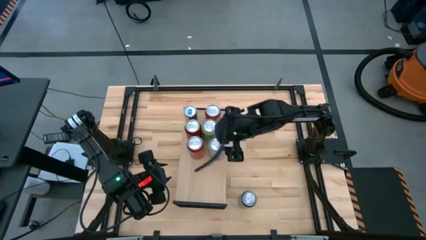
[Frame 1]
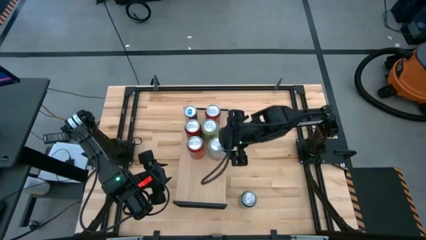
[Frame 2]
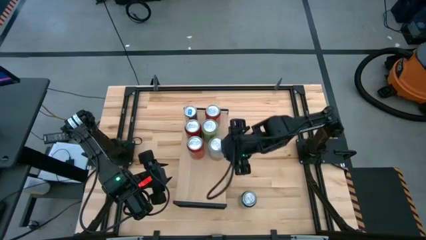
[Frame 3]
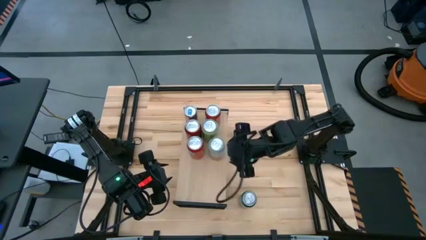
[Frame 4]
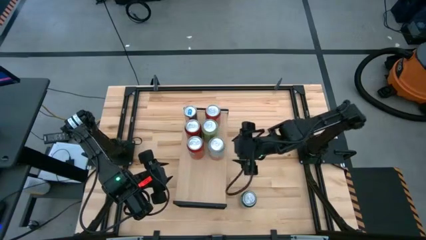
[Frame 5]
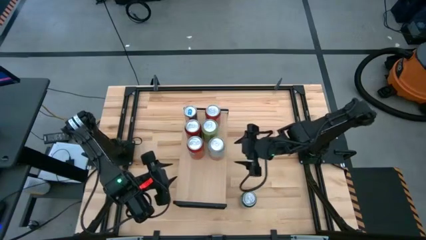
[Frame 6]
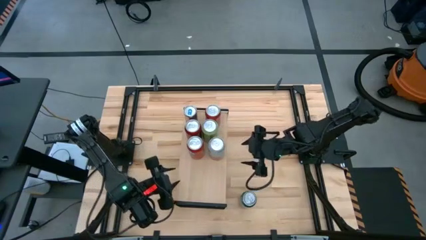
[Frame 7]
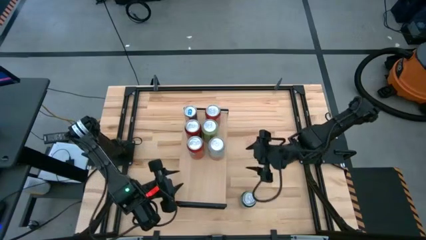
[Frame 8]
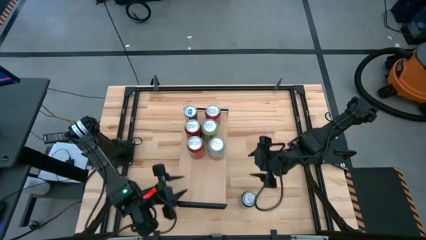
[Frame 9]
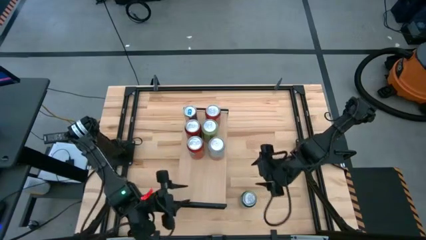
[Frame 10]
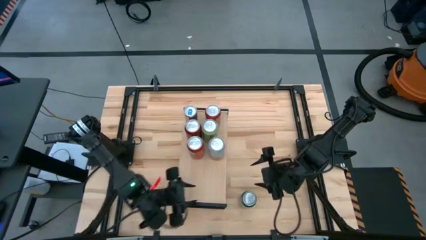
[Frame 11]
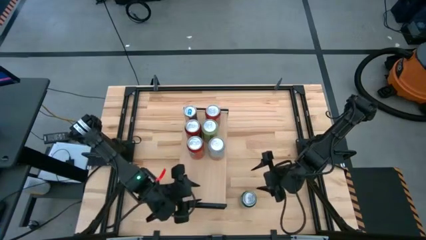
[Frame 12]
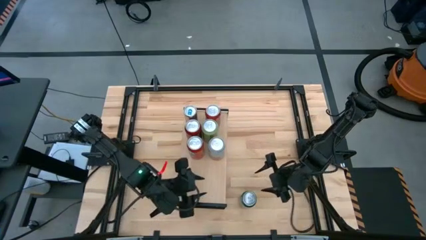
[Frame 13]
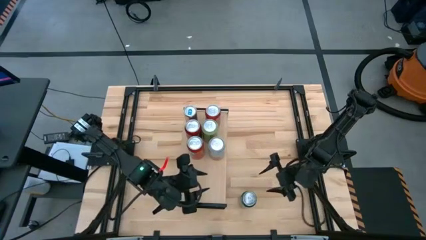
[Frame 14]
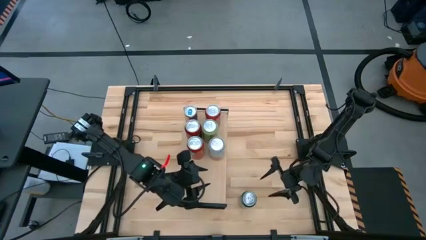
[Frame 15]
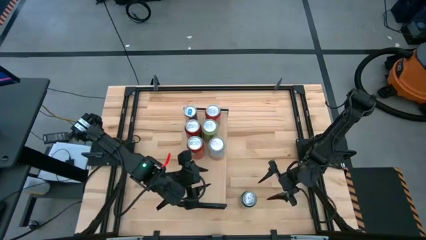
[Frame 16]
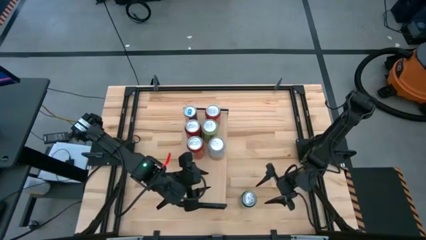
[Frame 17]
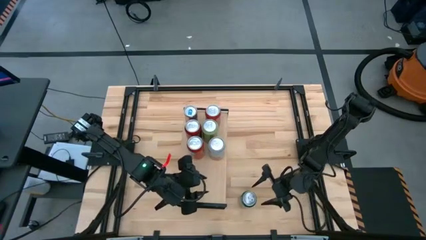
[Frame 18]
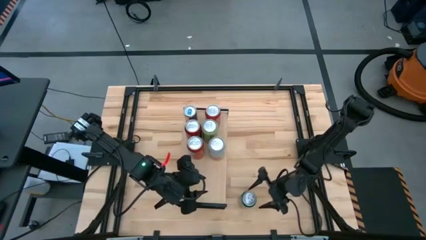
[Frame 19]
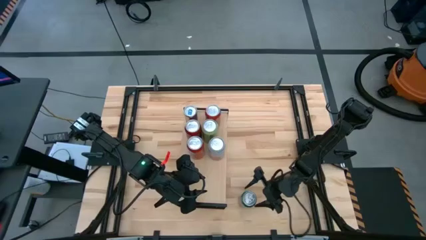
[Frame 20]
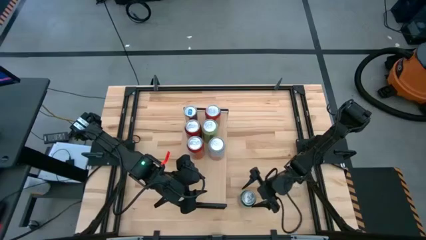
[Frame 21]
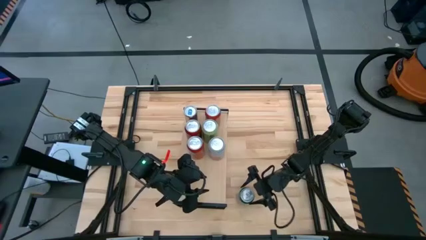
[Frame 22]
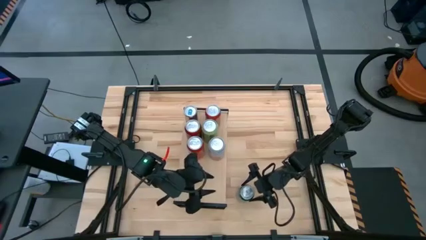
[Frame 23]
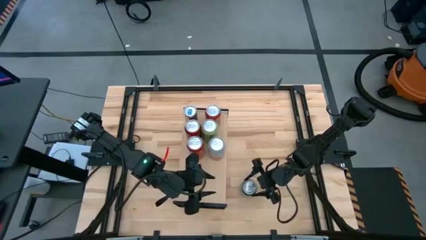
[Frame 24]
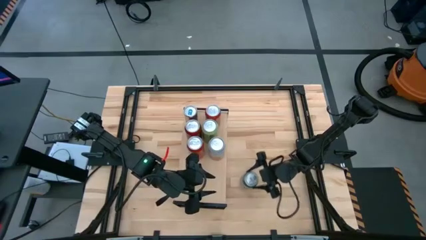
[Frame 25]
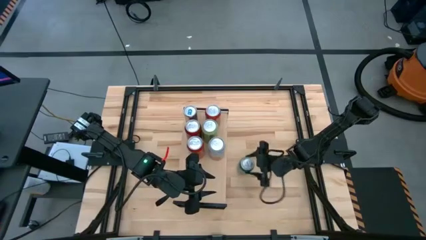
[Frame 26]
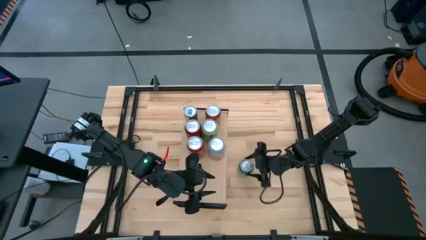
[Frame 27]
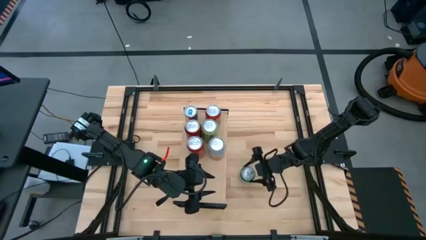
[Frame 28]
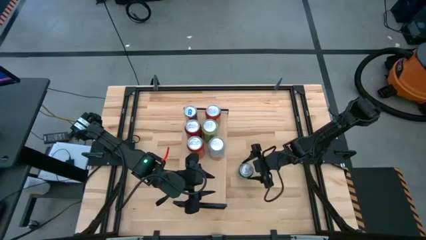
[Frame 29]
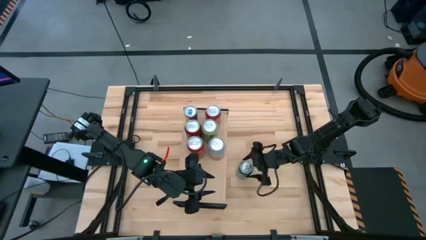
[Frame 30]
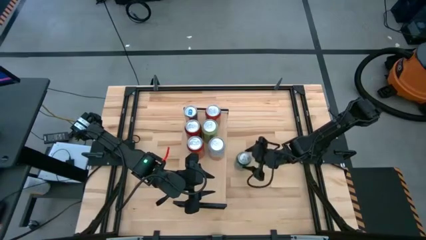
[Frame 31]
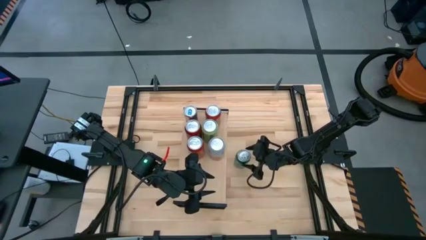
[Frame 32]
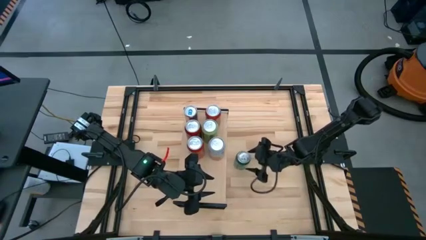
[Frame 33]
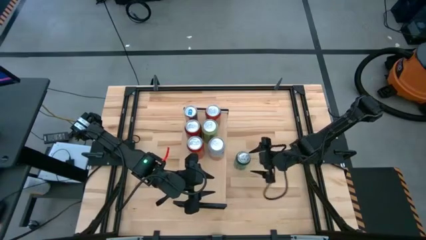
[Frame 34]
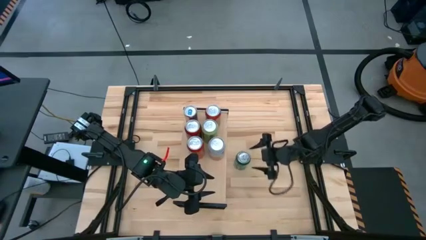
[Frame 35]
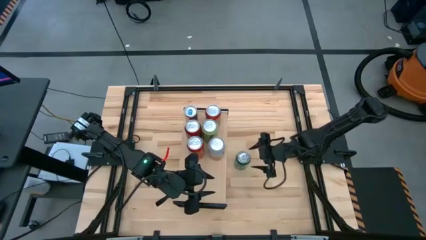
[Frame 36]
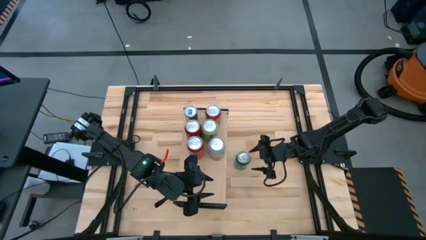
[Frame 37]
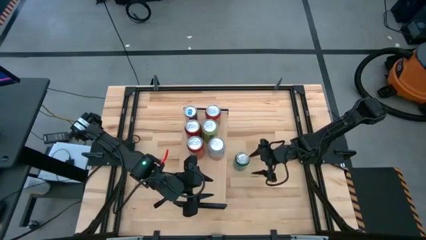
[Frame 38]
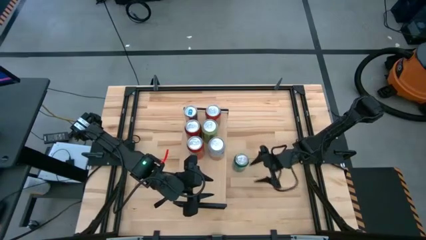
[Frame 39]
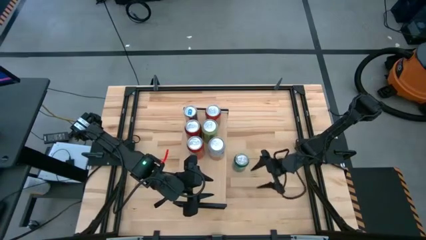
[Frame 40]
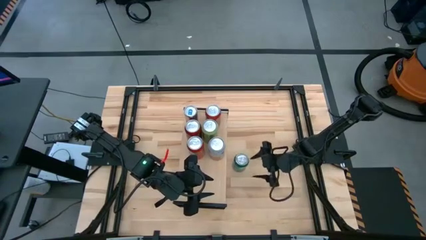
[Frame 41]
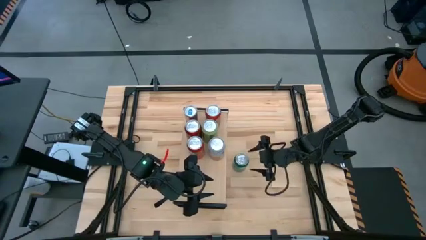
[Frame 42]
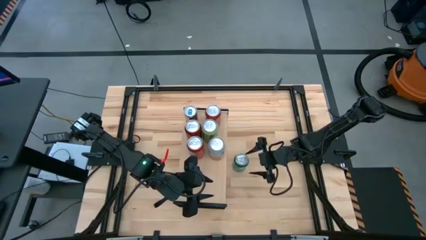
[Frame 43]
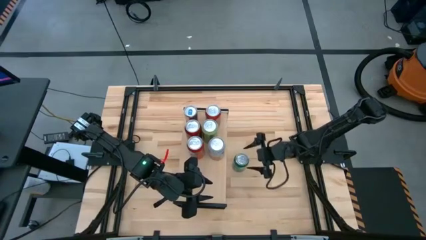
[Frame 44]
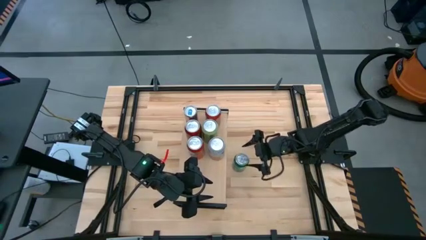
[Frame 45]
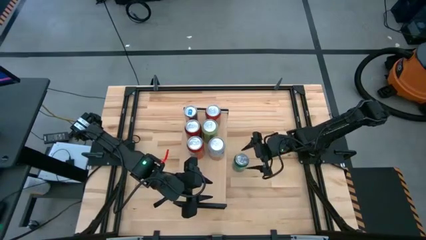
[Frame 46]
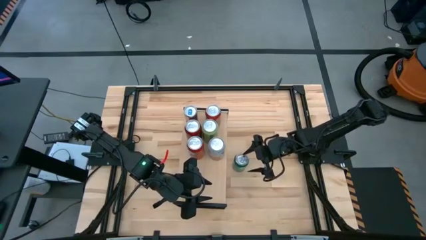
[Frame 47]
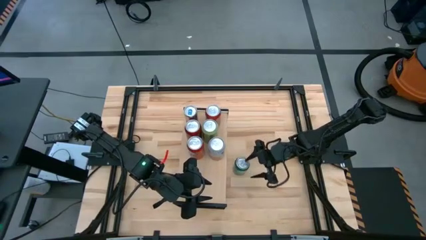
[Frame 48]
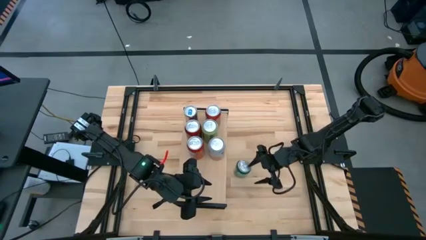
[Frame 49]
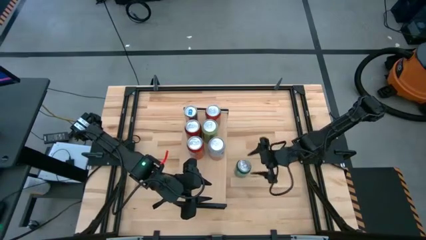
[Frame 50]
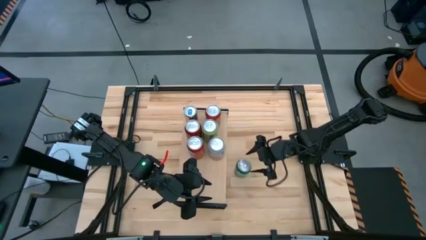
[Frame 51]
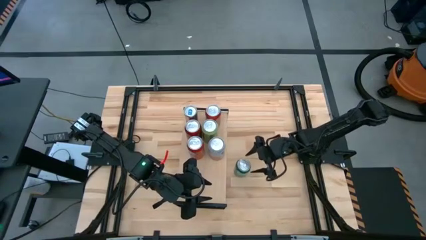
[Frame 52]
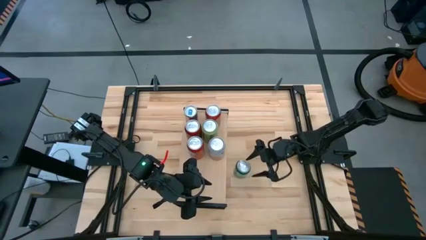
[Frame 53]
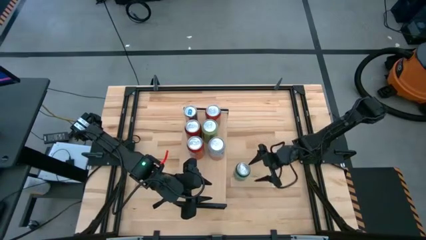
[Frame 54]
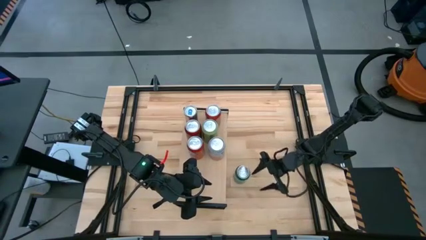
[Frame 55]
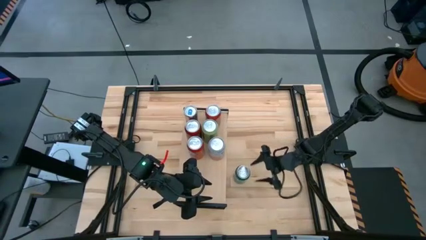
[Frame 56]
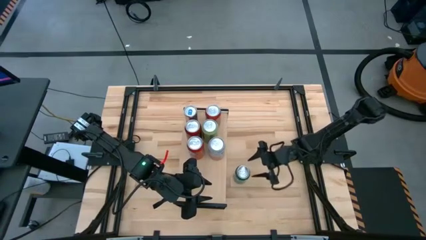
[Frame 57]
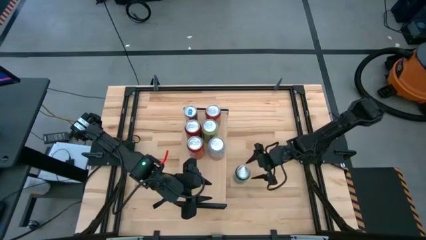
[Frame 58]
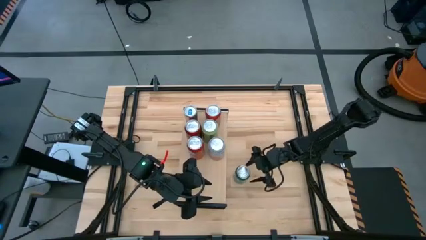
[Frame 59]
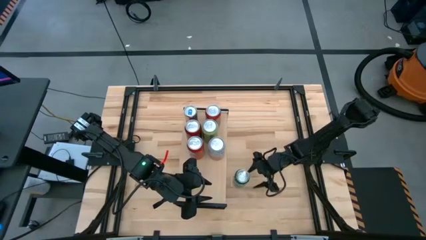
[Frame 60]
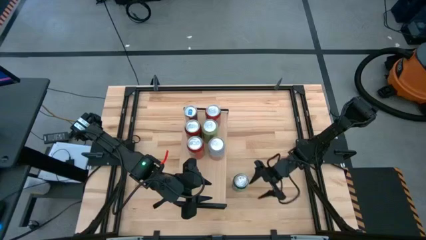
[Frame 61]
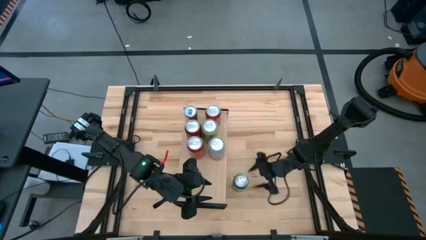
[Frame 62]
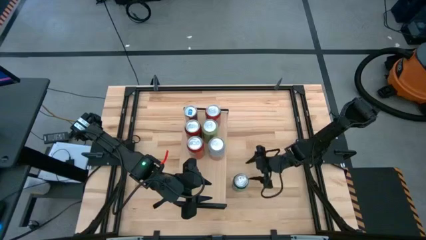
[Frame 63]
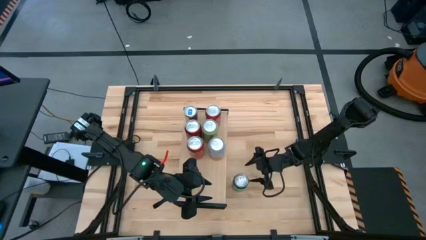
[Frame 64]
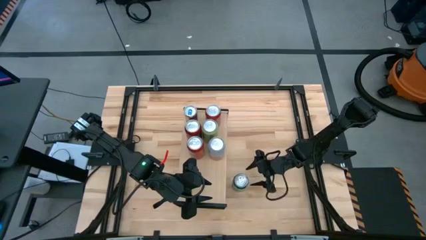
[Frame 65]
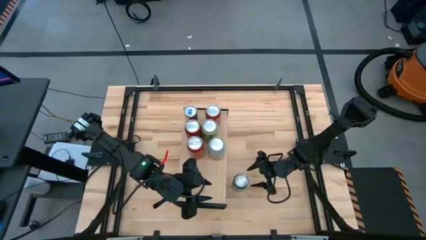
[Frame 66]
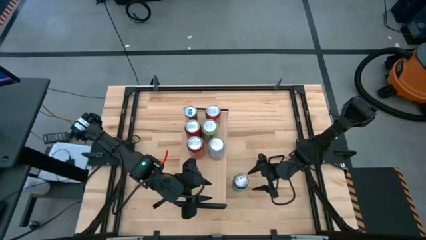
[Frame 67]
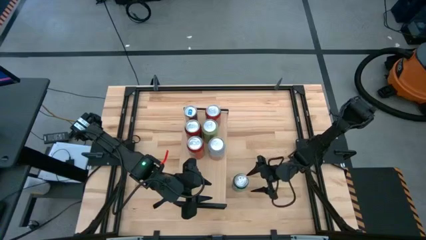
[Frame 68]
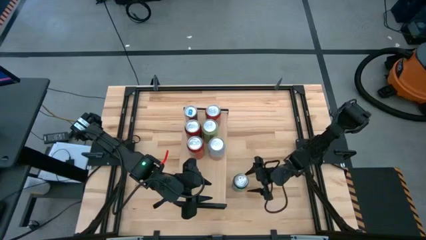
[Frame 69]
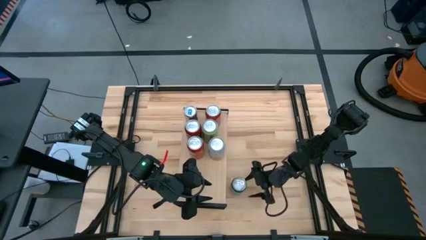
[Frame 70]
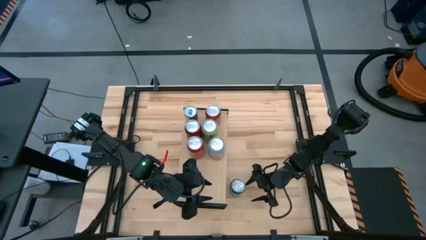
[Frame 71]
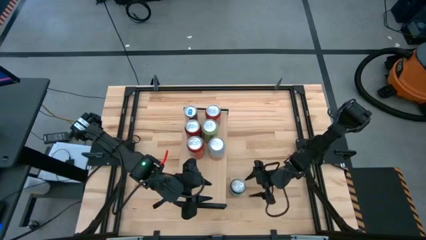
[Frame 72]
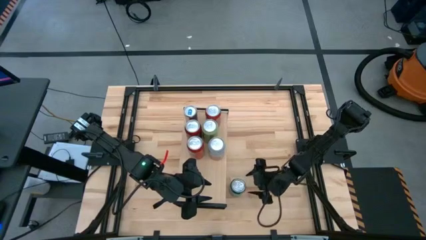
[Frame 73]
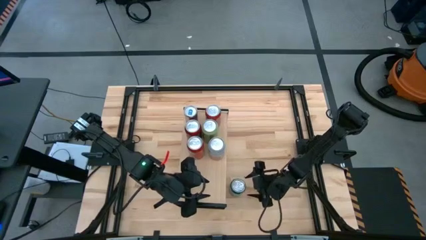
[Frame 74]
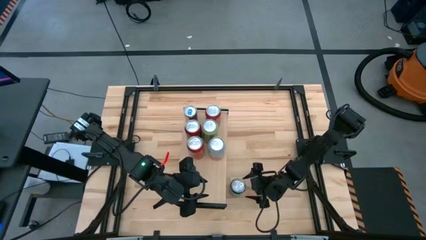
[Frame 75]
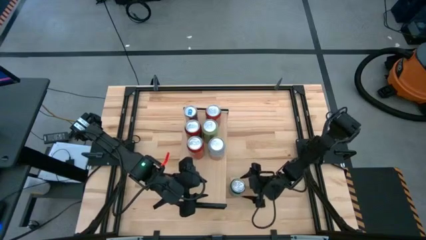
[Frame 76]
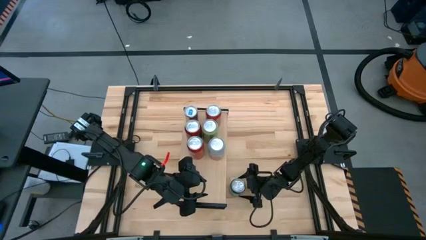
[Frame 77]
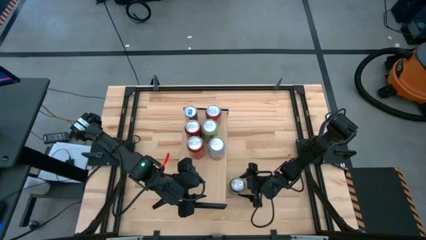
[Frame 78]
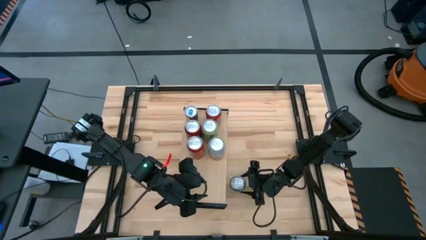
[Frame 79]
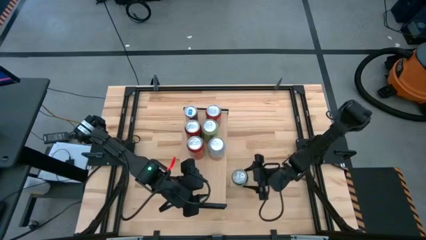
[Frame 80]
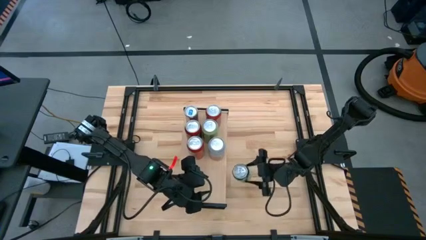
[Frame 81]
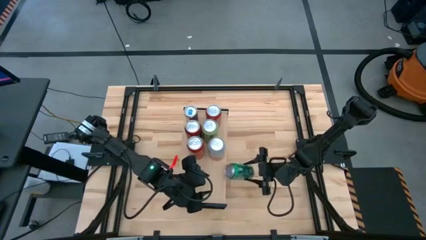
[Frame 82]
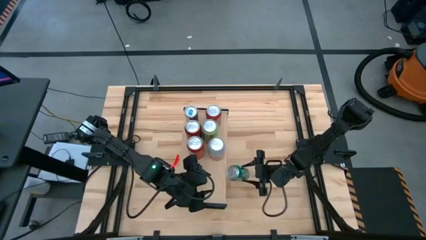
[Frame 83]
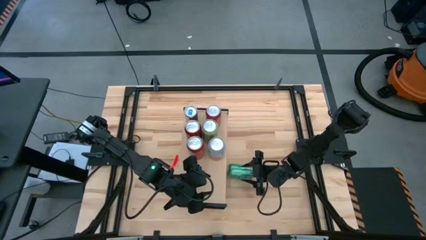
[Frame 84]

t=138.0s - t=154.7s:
Task: Place canned beverage on shelf
Put the green soda can on the shelf
